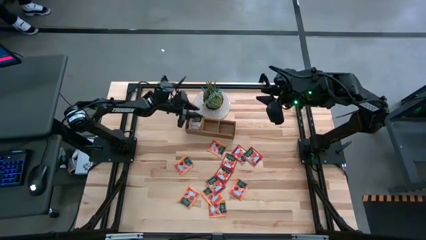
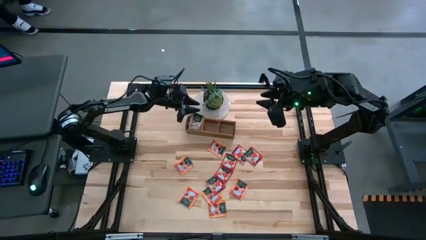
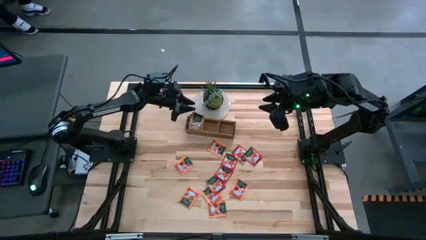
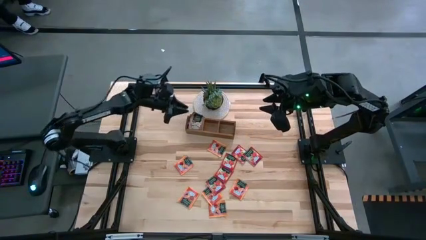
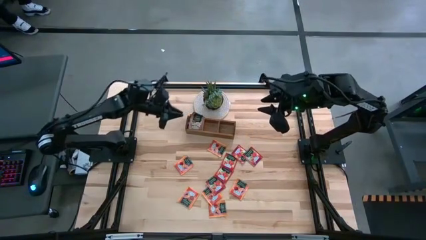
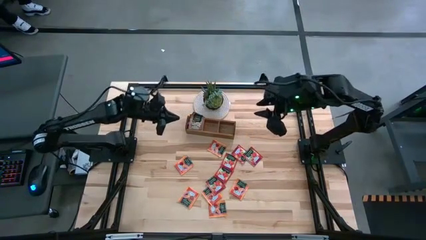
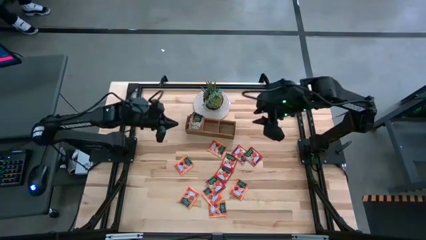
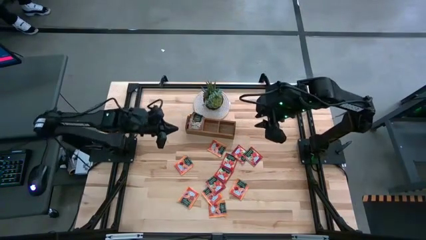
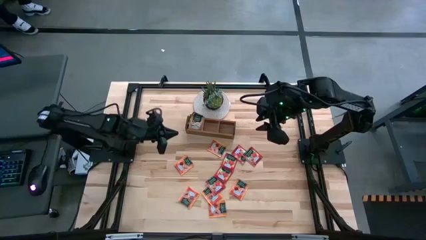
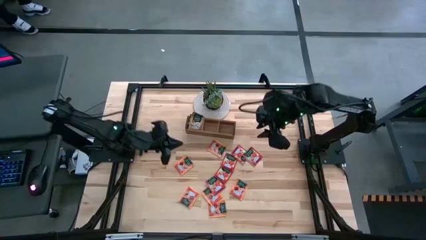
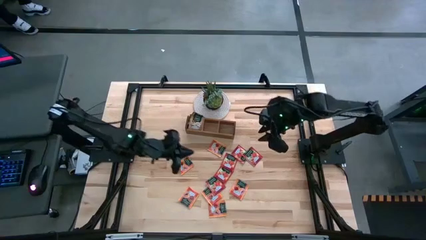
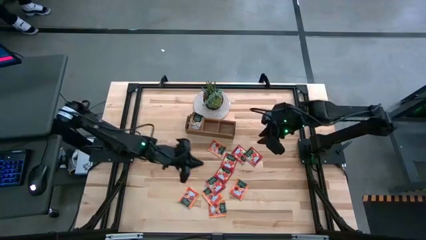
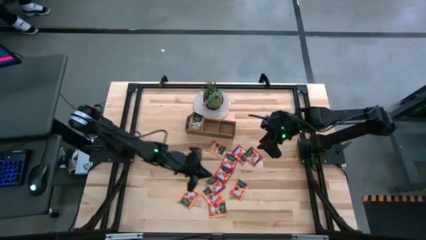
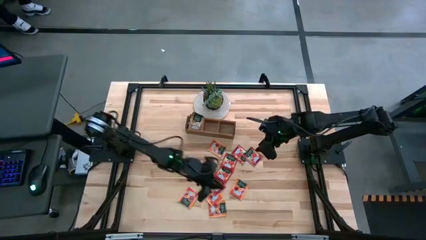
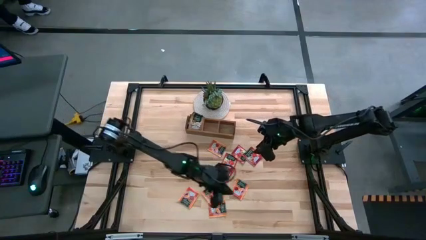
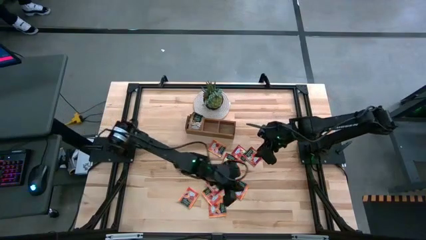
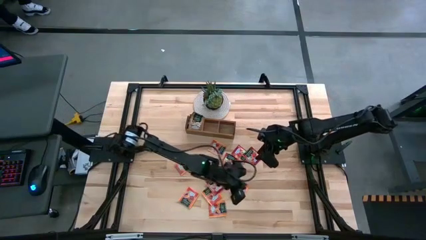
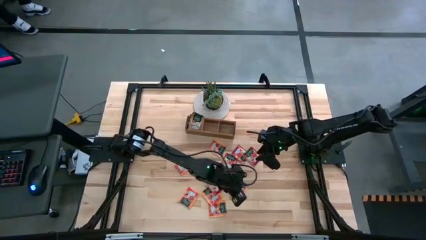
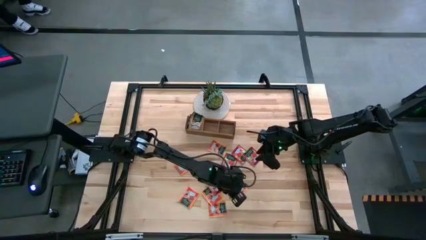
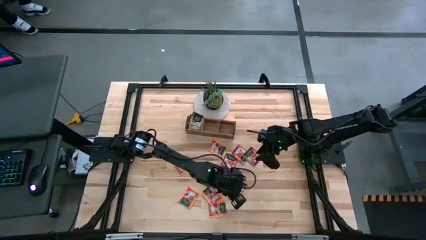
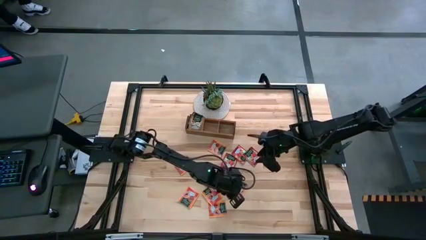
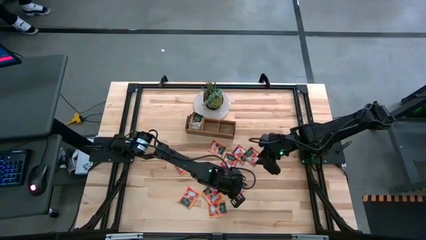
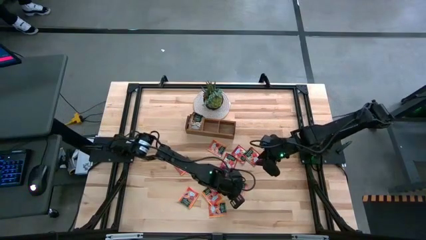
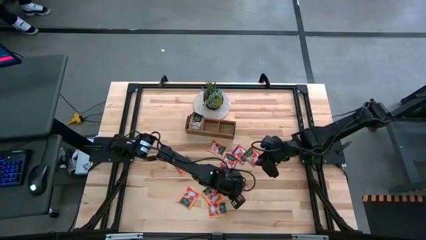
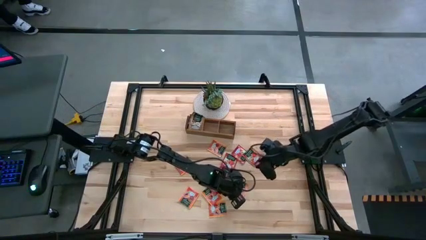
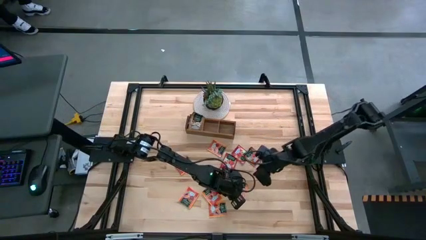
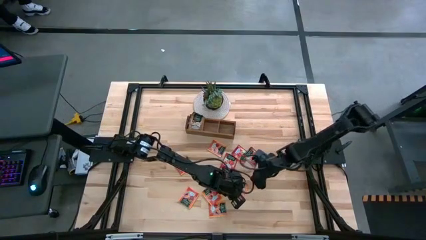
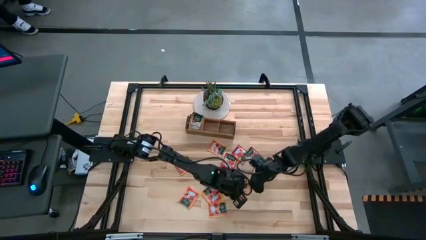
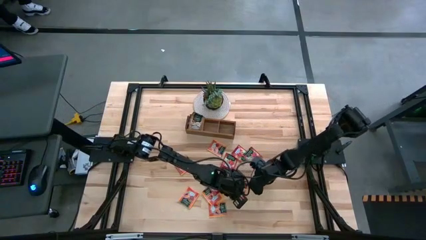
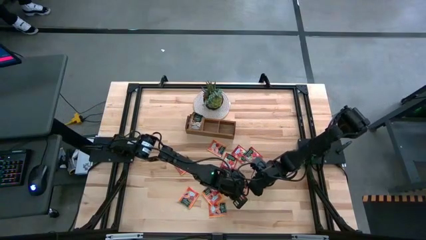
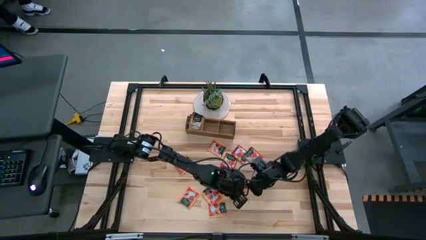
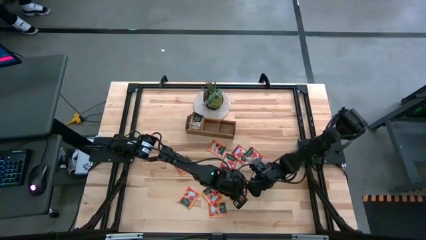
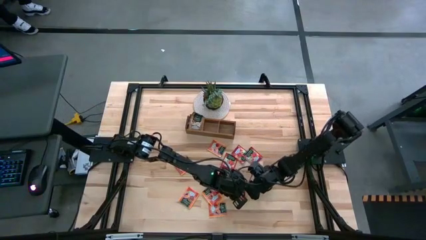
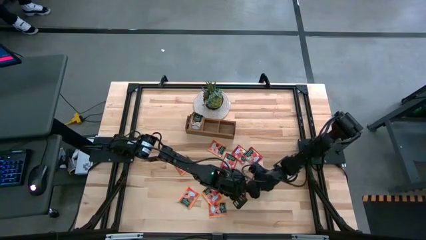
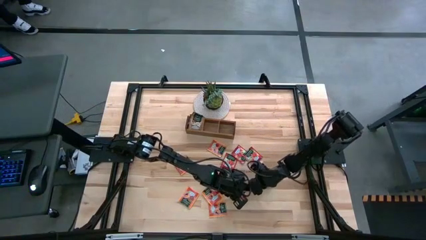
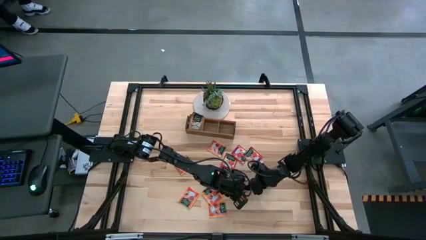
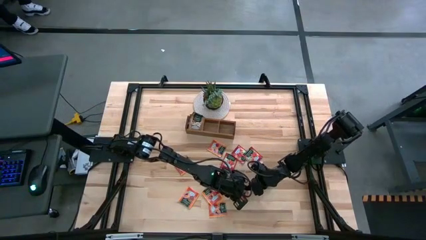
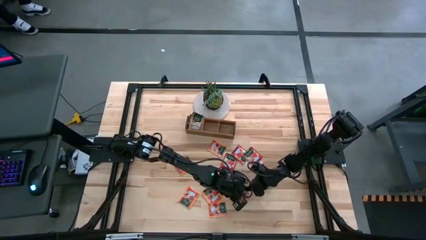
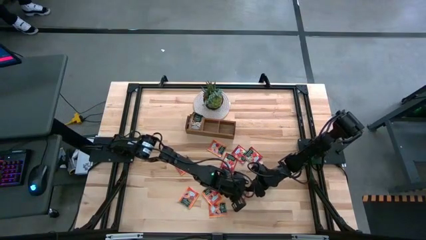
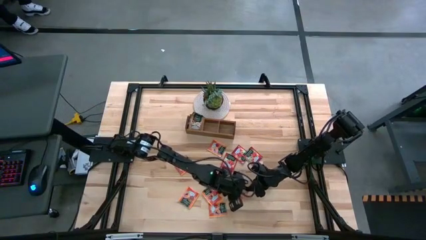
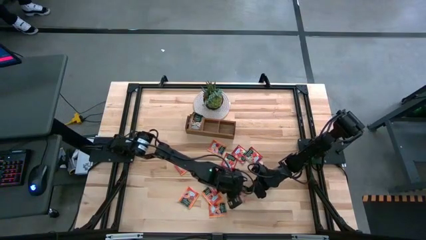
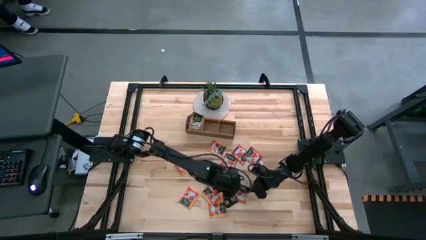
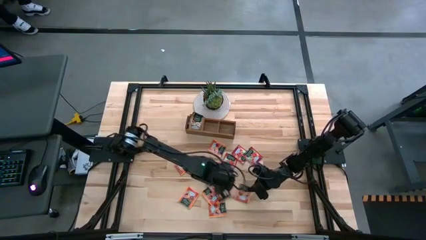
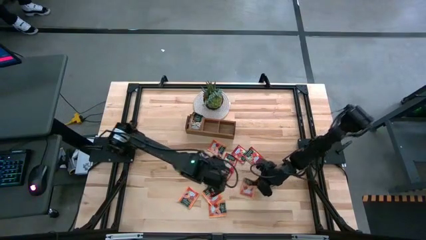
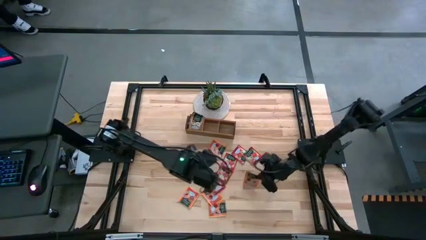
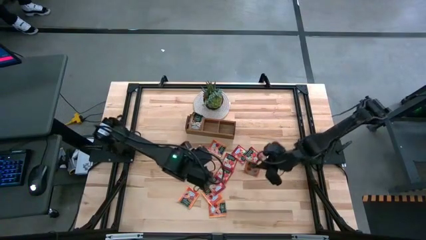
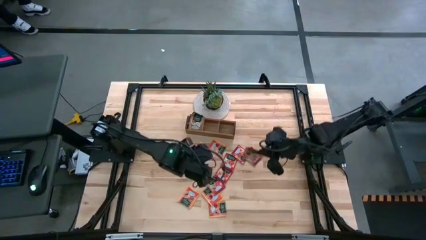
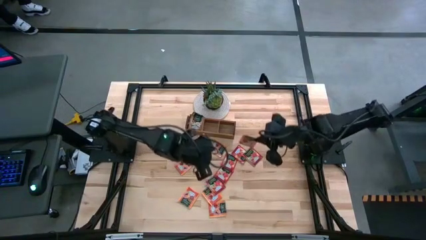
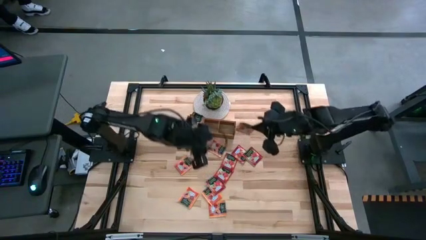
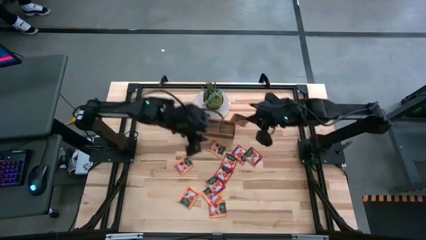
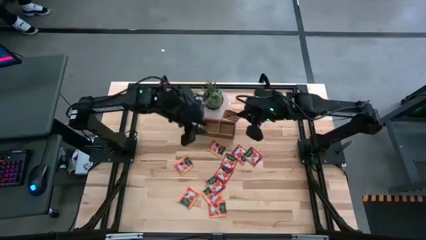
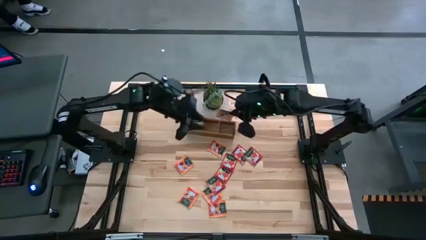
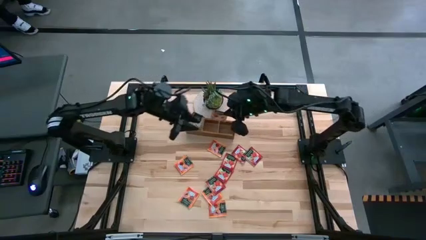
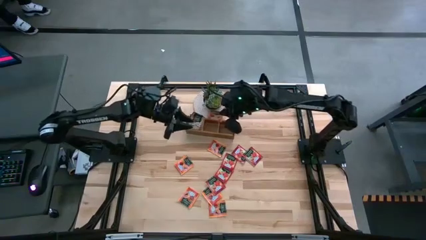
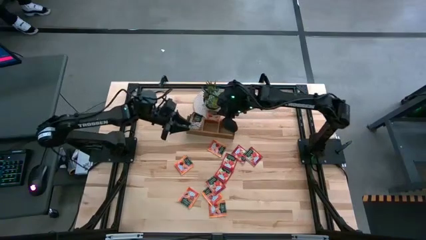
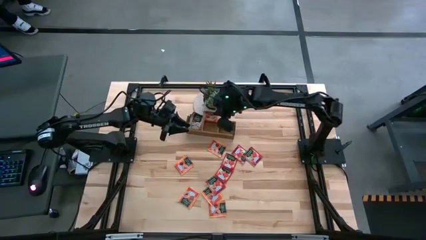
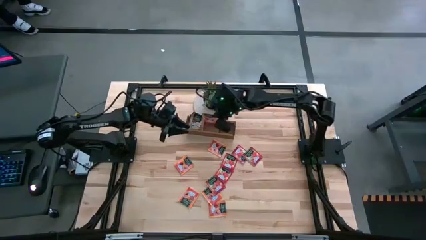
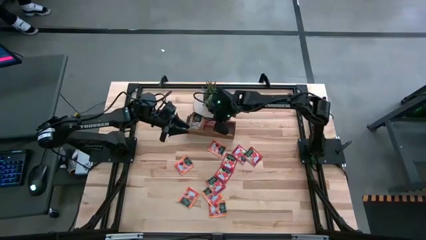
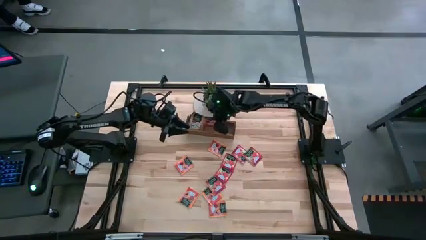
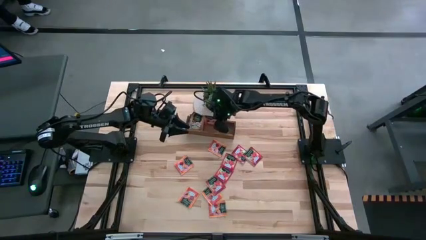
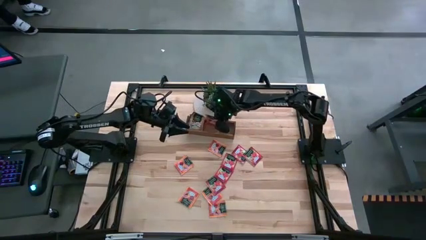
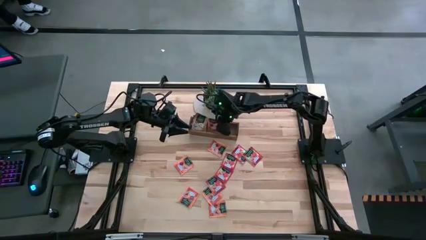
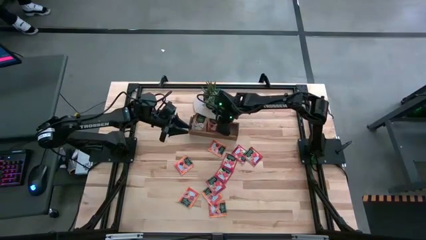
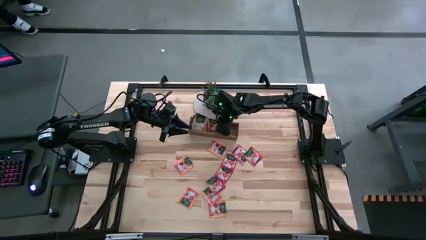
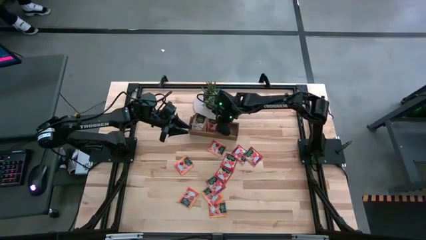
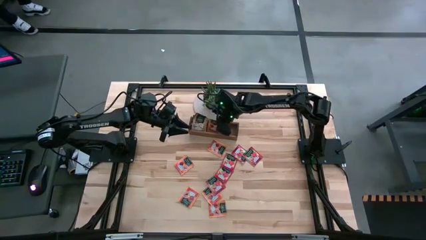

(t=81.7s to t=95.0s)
Task: Pick & Place Tea
Put the orange tea bag into the middle section of the wooden organizer

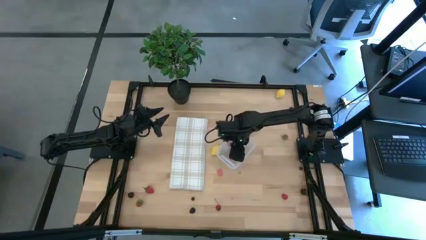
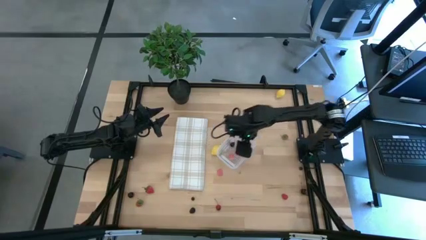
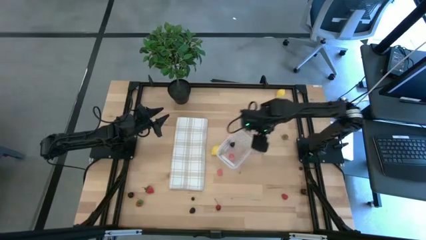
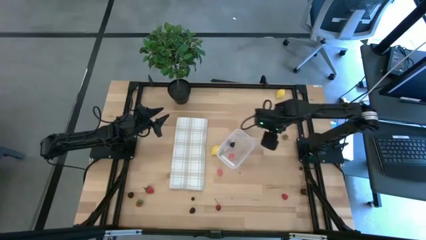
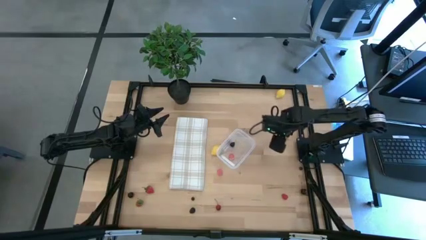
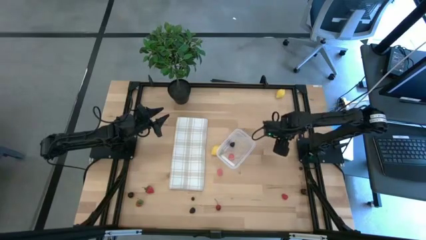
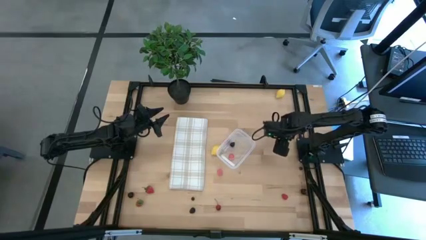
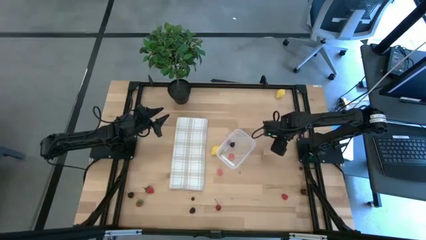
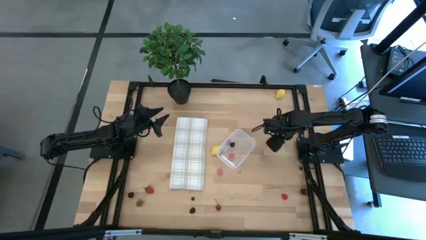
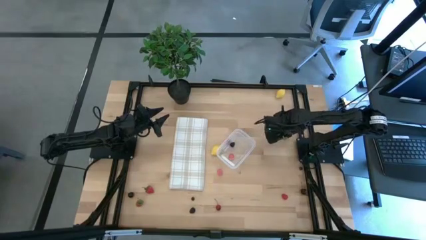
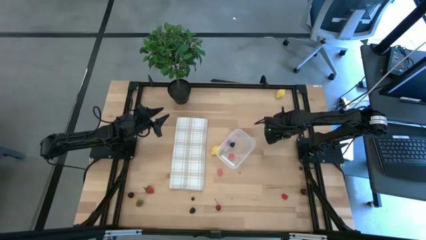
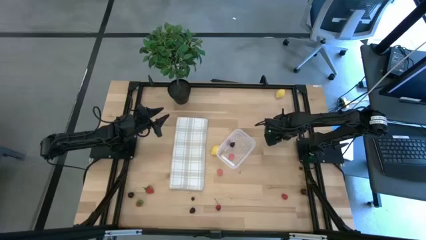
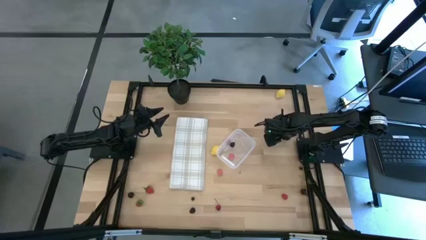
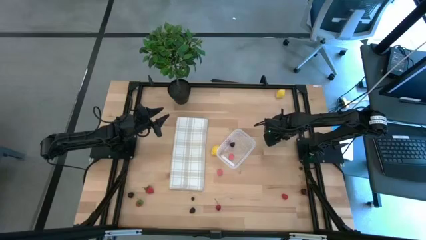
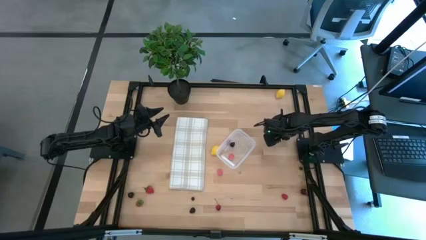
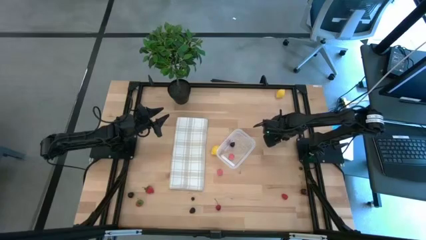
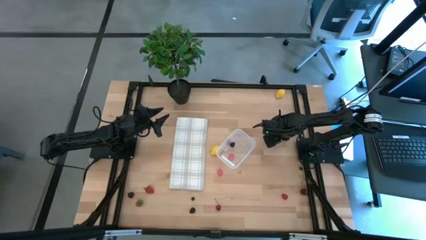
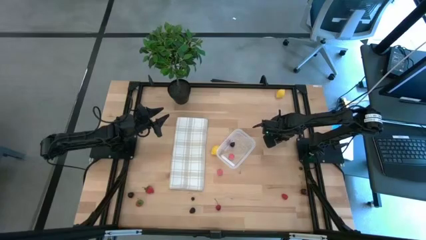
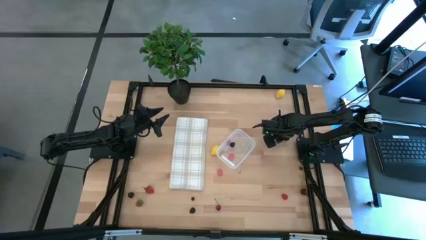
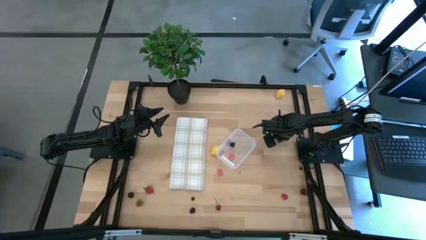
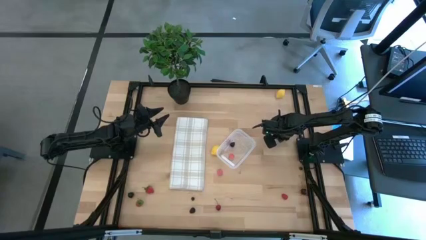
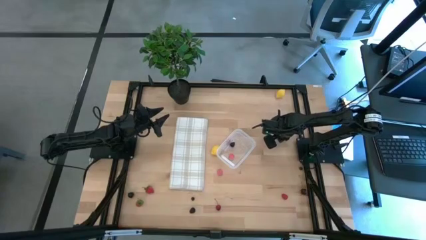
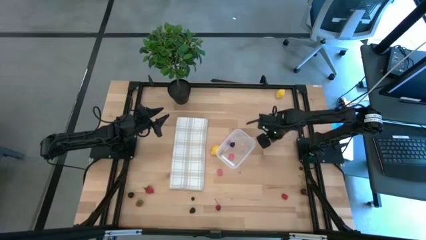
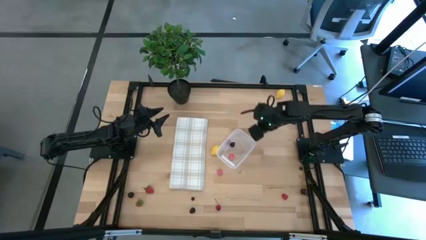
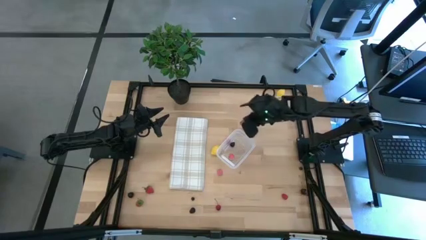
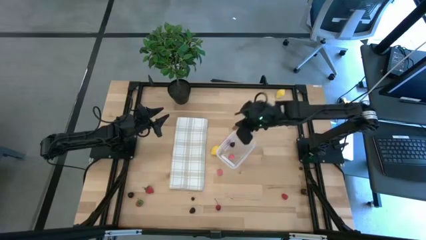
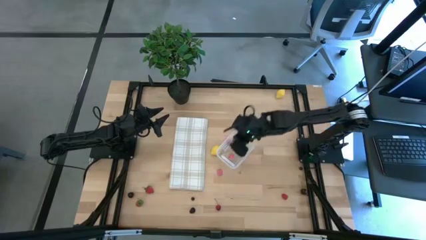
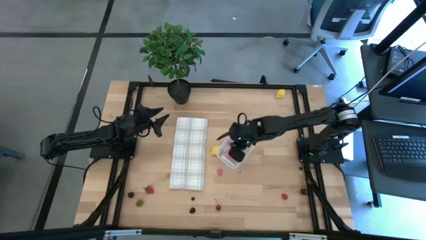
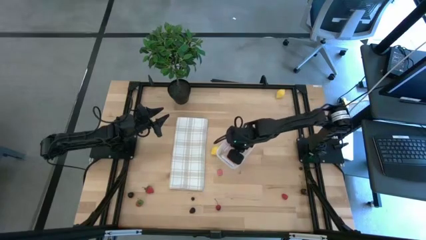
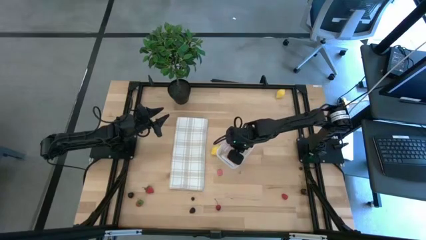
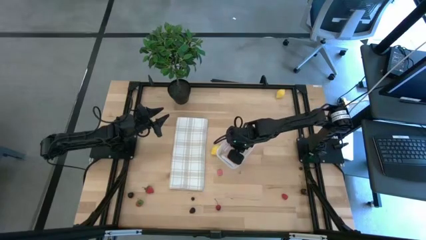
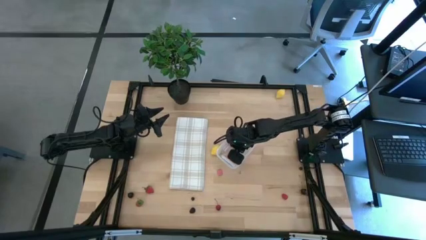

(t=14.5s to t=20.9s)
Task: Pick and placing Produce into tupperware
Put the top right strawberry into the transparent bin
